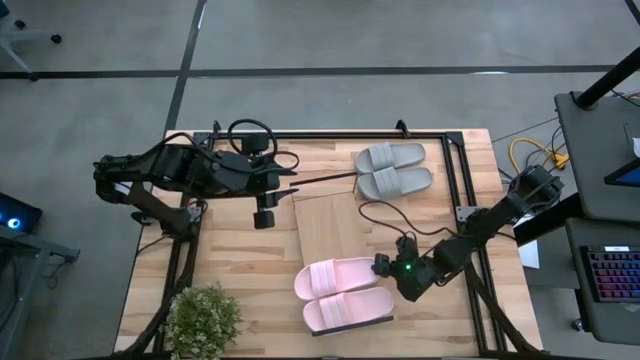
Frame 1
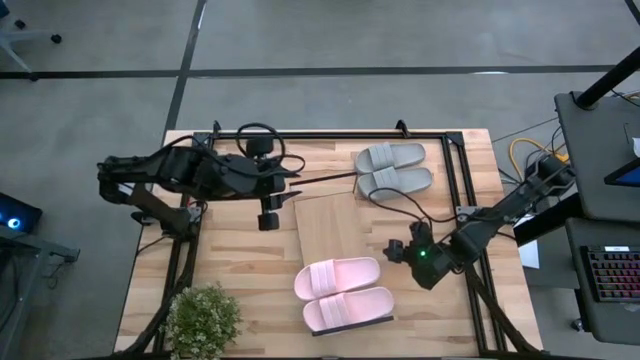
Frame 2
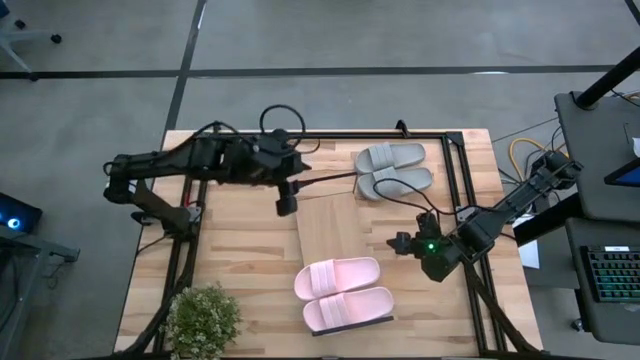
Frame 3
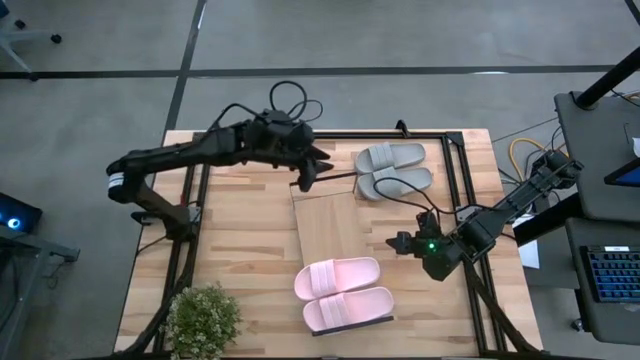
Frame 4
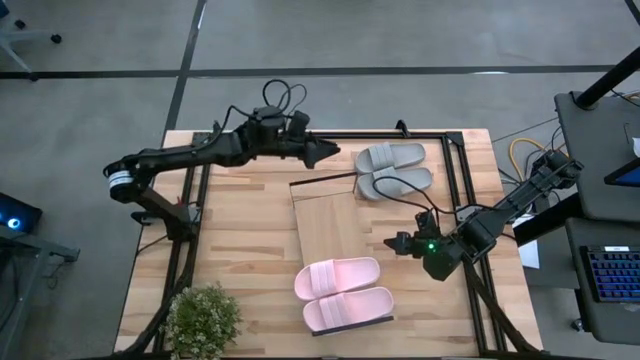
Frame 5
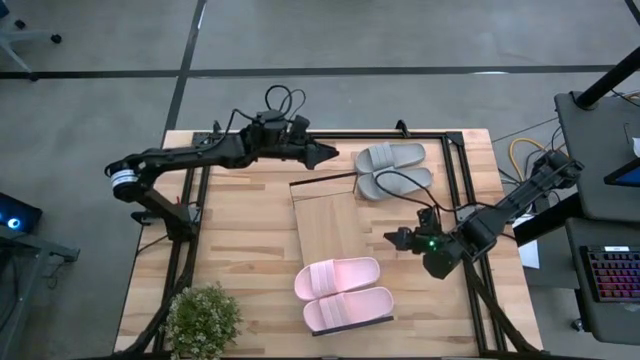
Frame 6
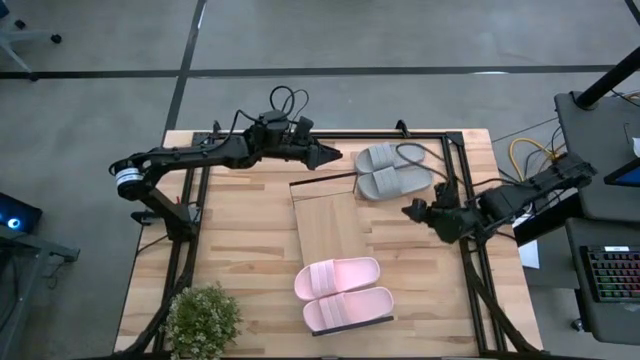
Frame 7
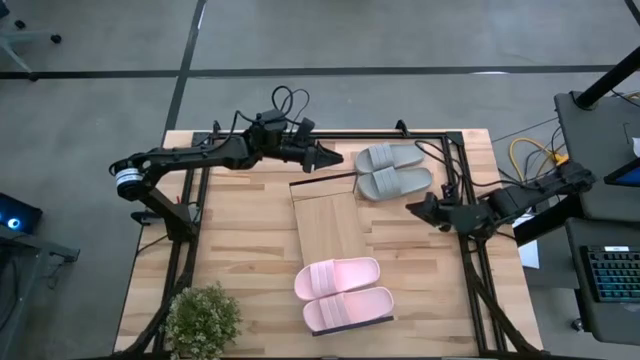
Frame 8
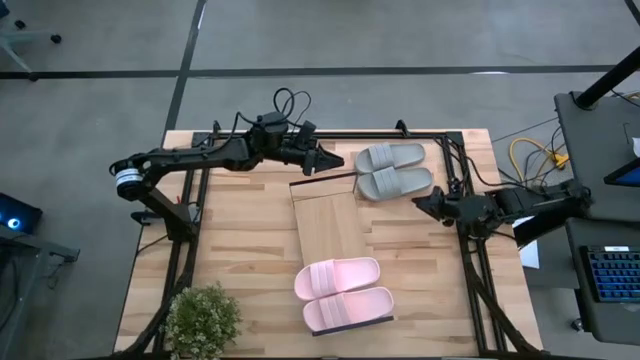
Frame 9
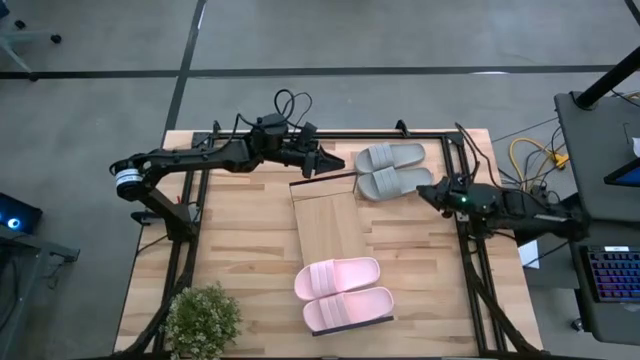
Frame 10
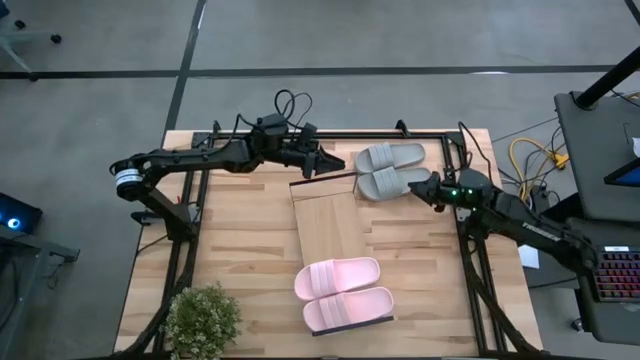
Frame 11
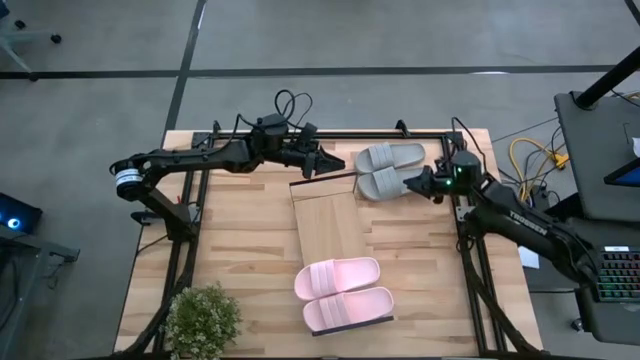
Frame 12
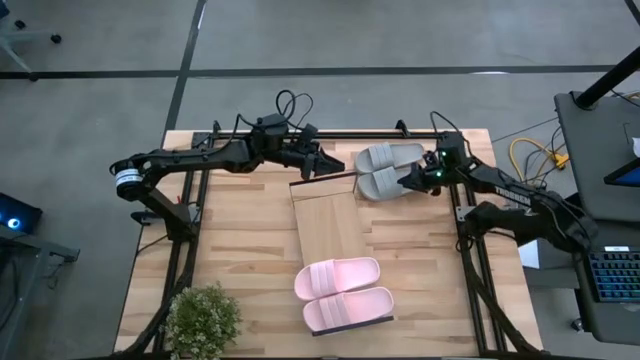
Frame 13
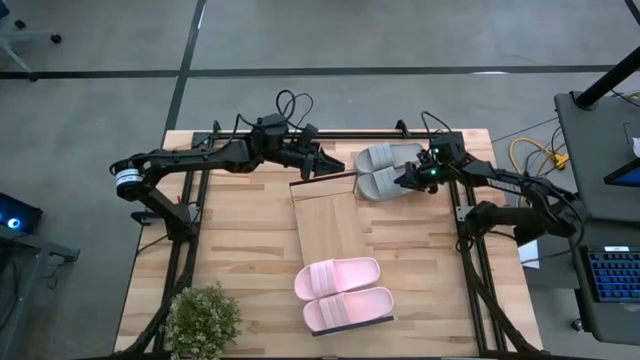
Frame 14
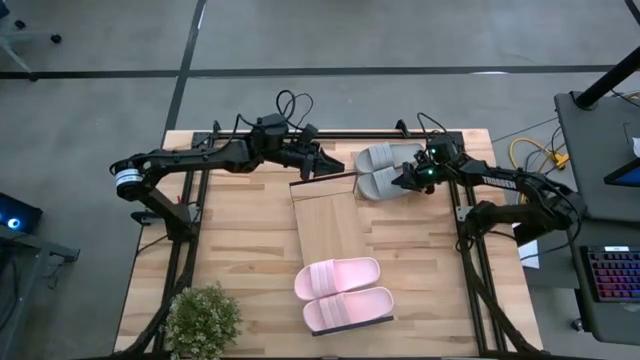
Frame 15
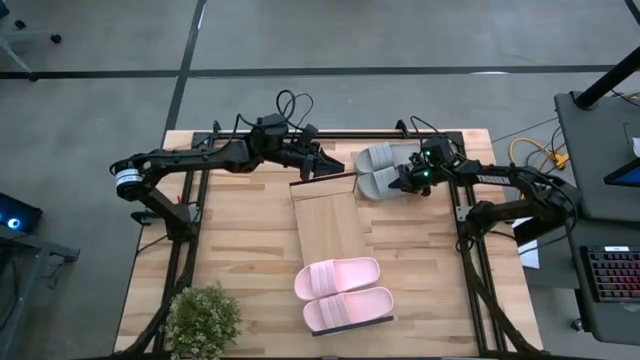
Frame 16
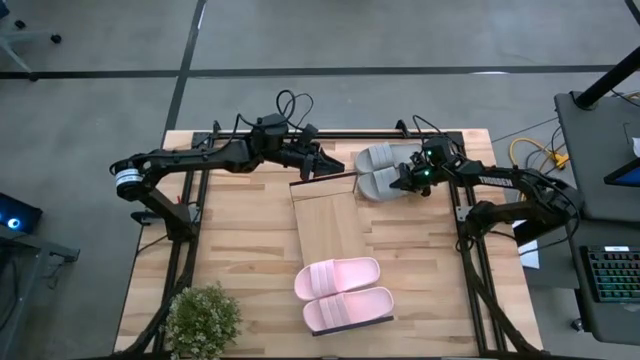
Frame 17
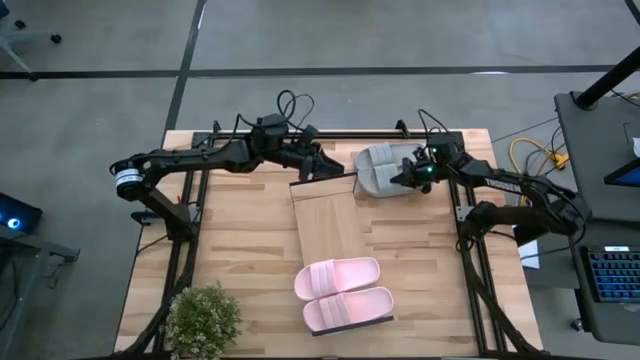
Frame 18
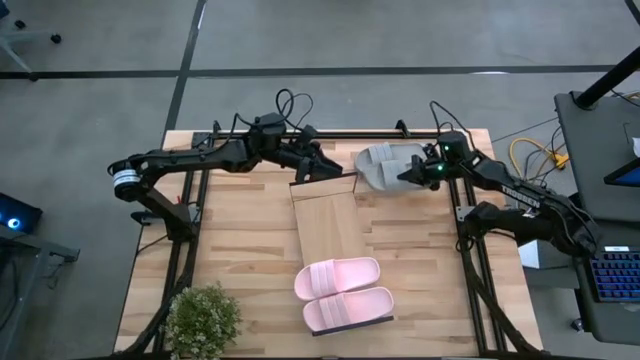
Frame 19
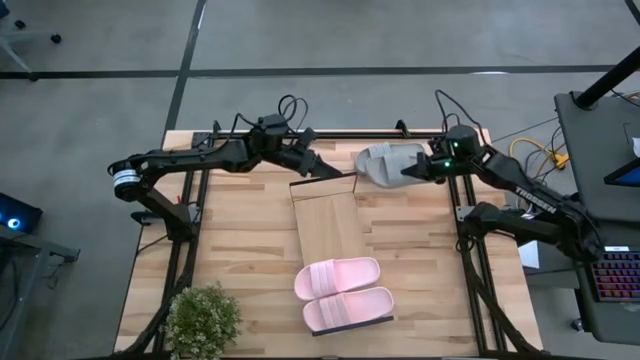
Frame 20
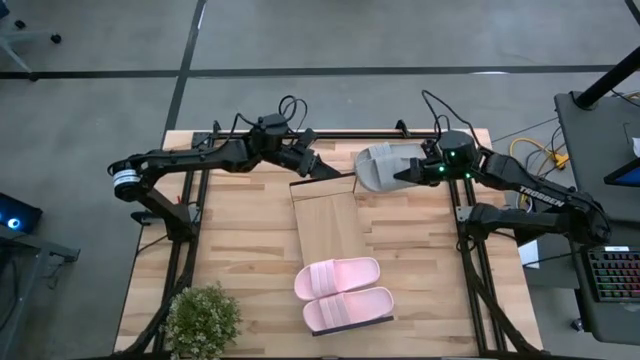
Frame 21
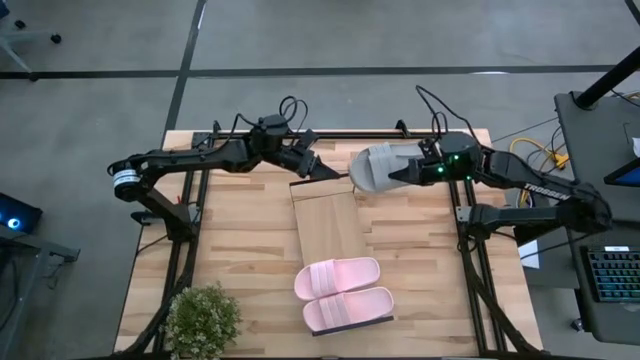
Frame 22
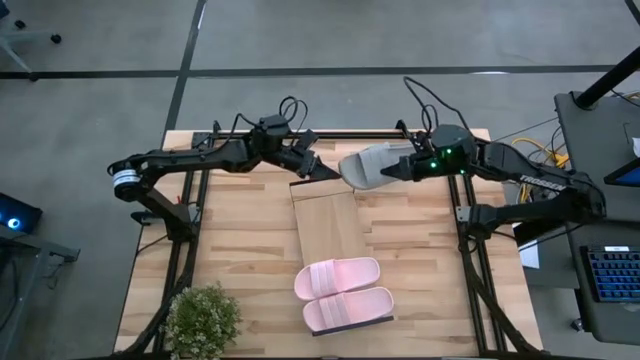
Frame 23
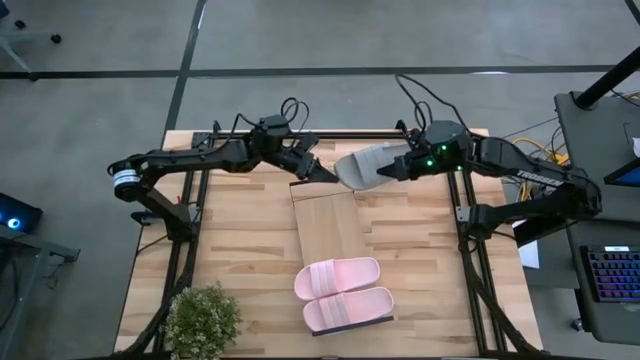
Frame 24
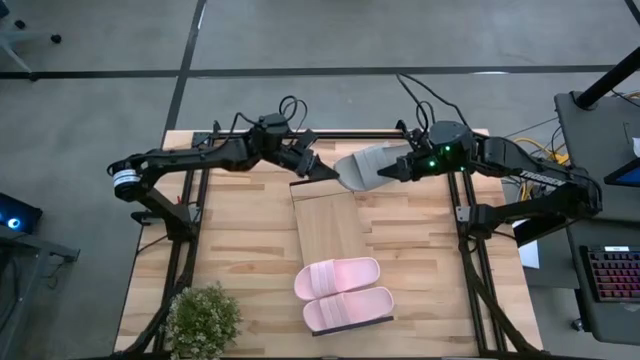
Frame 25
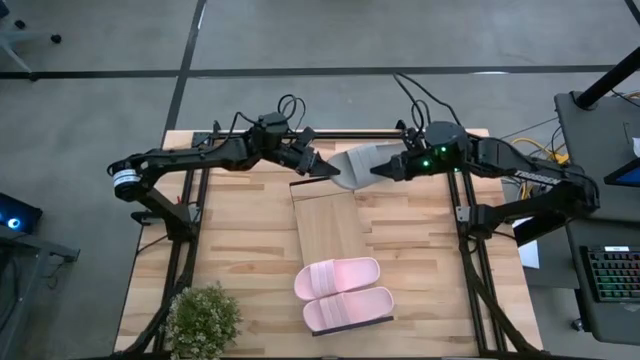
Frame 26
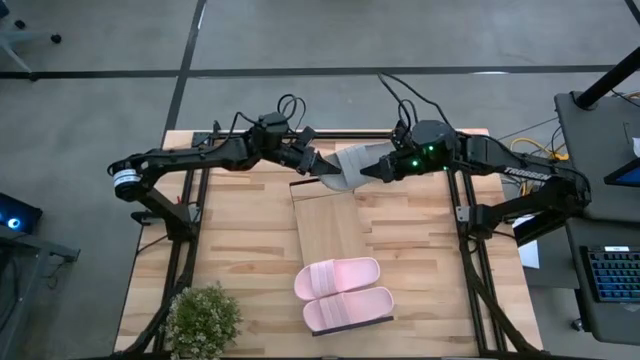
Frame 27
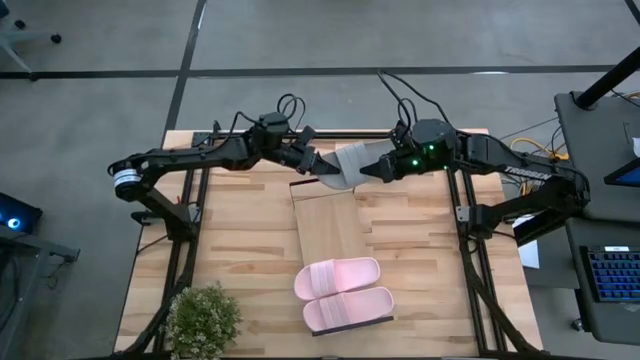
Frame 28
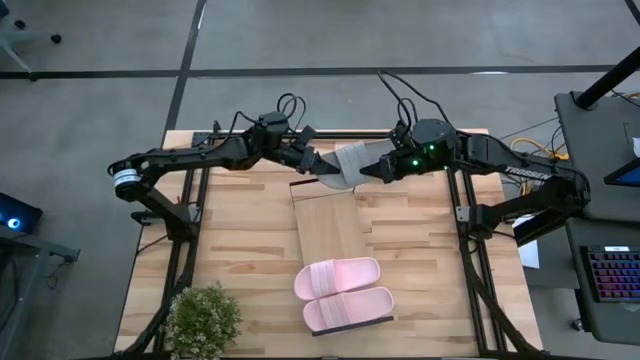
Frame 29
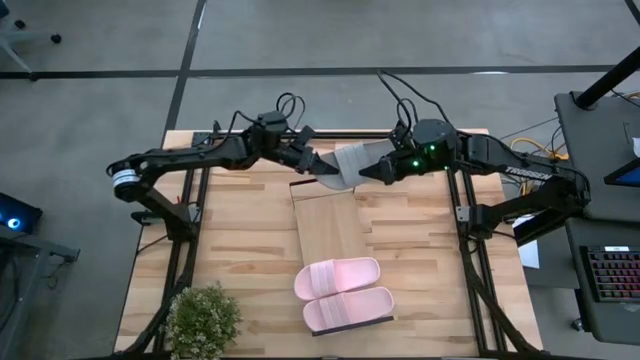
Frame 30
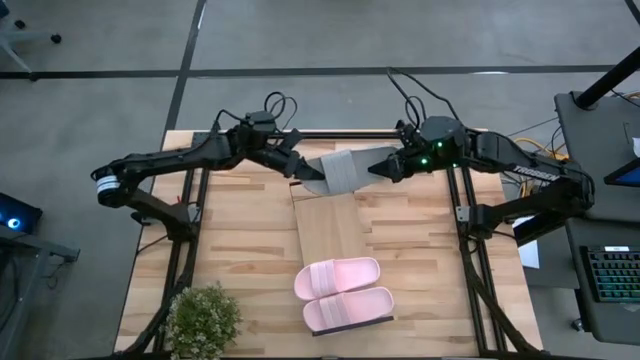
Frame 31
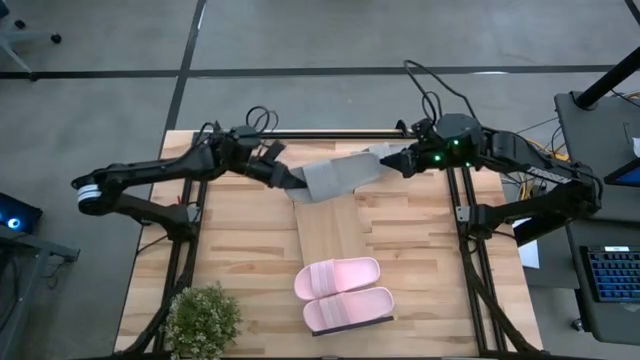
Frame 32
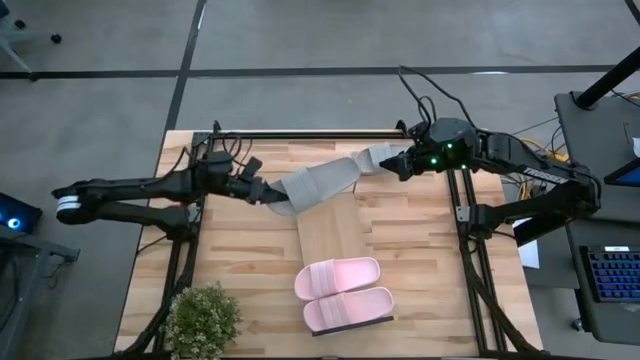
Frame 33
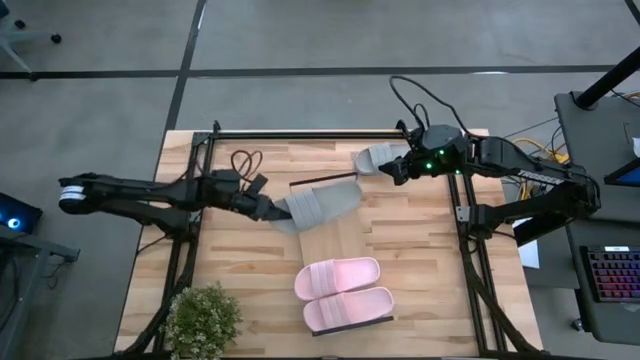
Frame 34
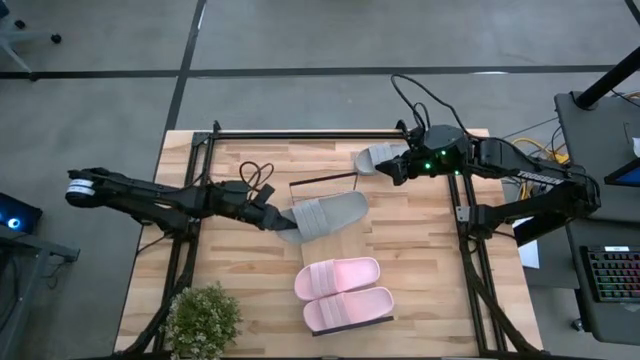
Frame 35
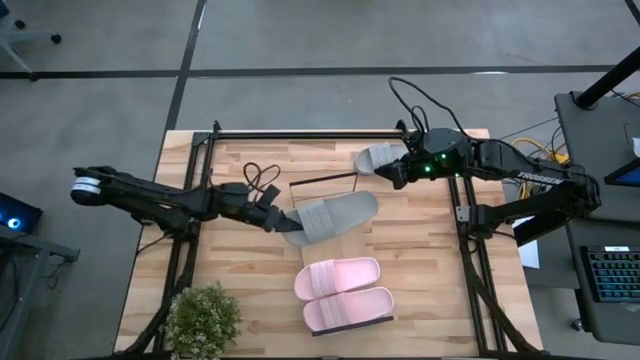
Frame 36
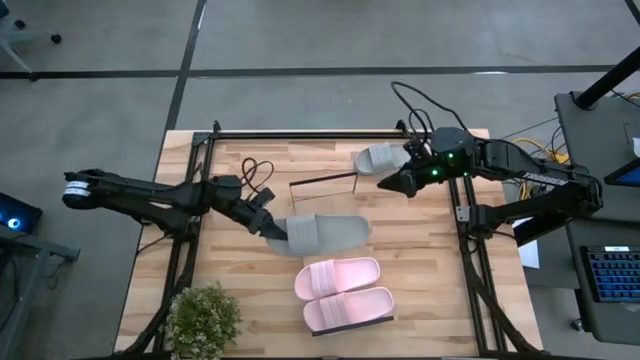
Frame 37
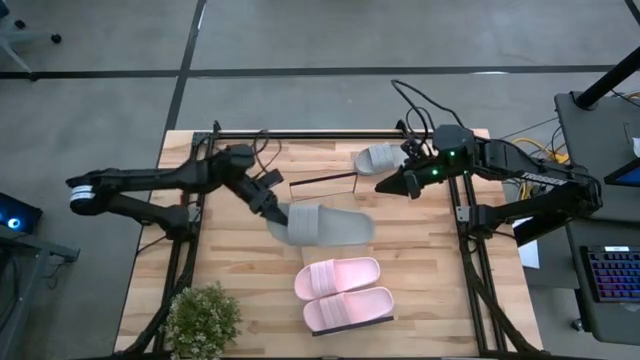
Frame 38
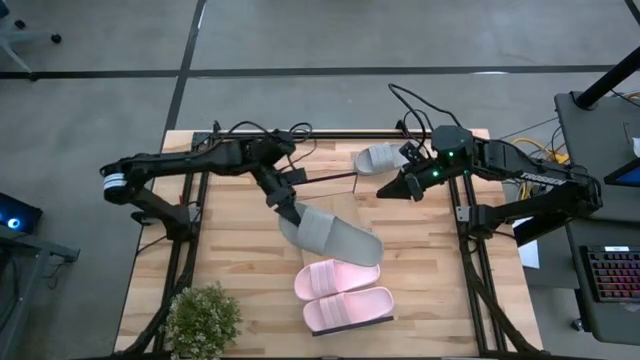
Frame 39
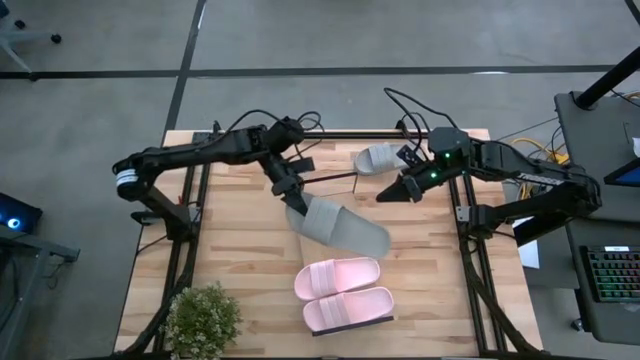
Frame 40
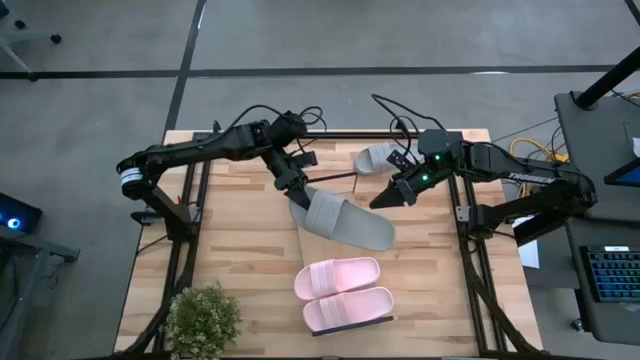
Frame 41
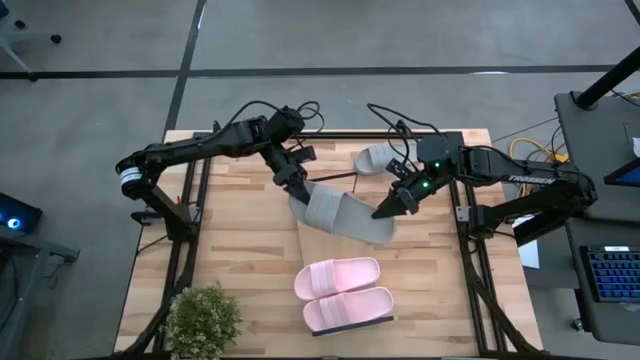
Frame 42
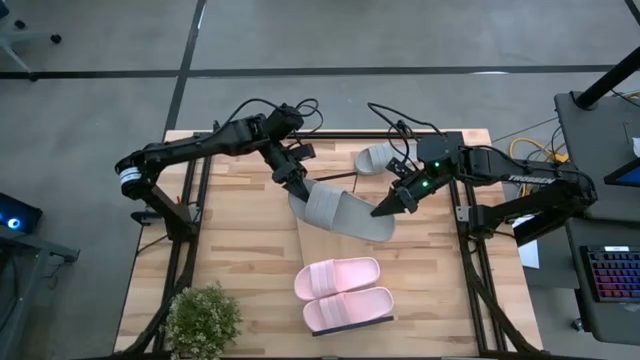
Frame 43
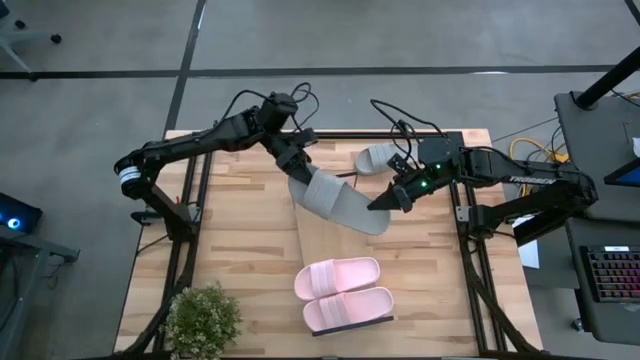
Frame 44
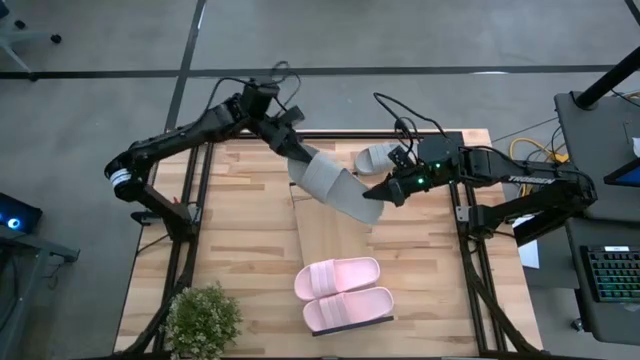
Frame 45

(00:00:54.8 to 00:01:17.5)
Task: Pick and place slides into the shelf
Put the bottom gray slide on the shelf
